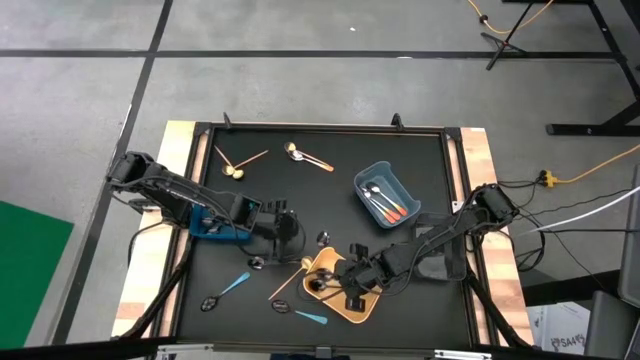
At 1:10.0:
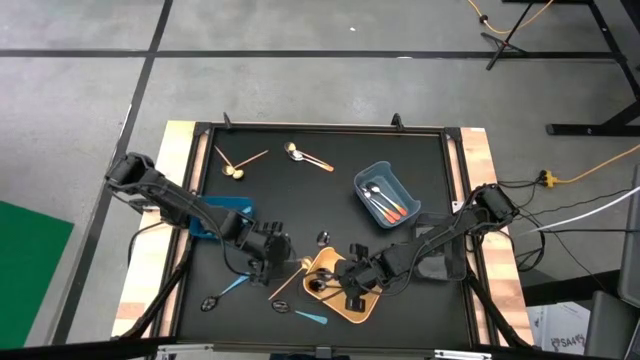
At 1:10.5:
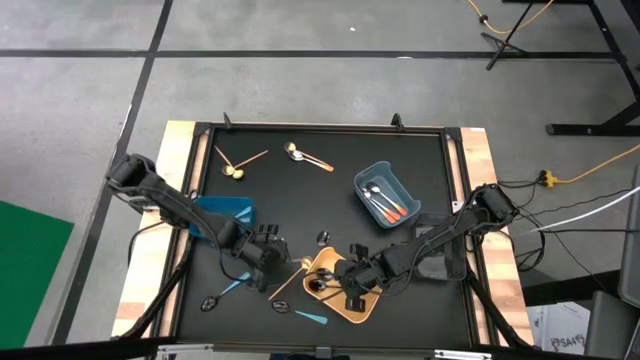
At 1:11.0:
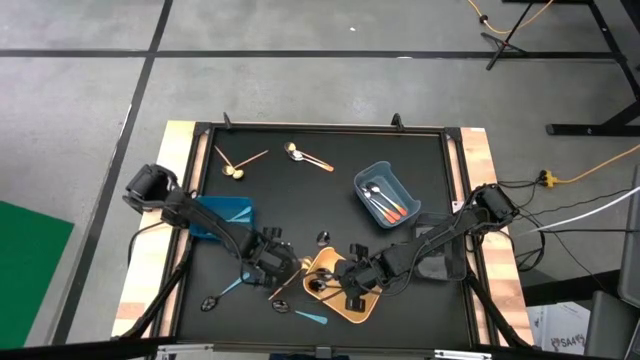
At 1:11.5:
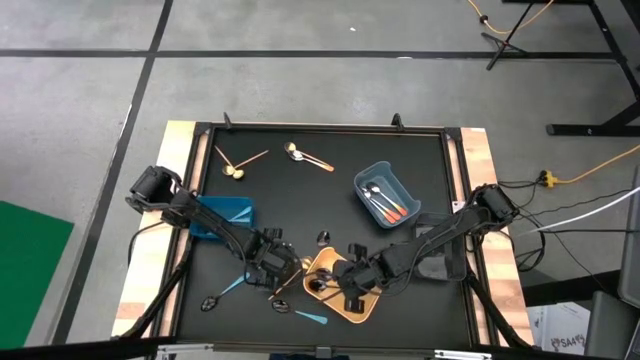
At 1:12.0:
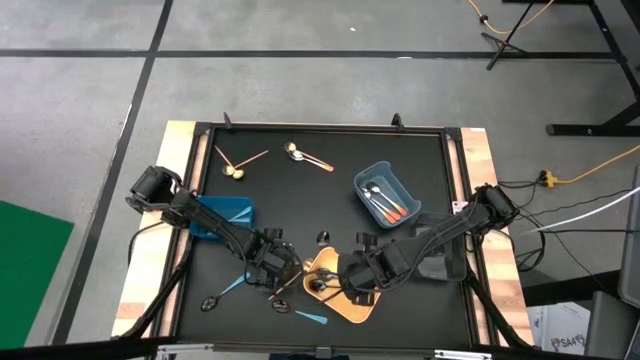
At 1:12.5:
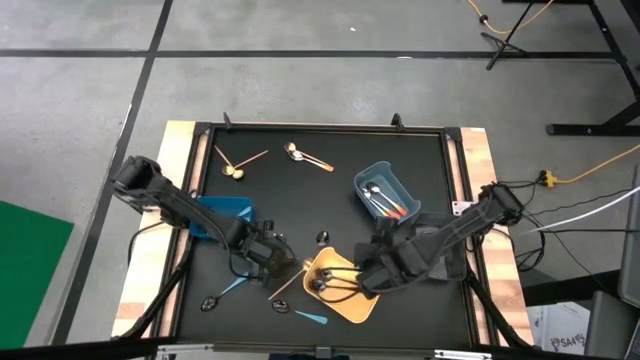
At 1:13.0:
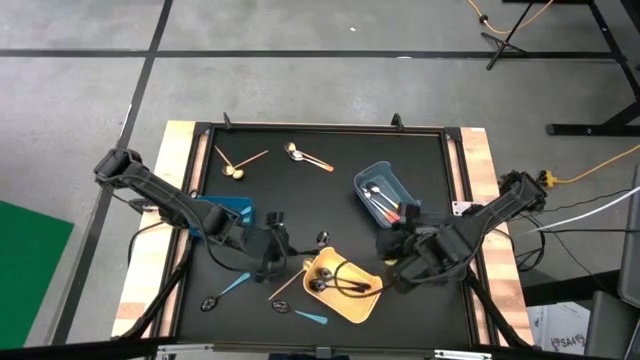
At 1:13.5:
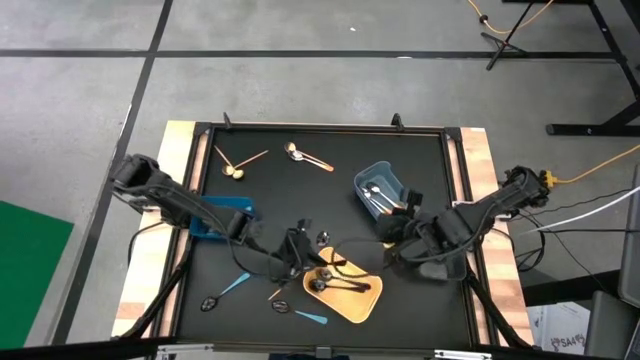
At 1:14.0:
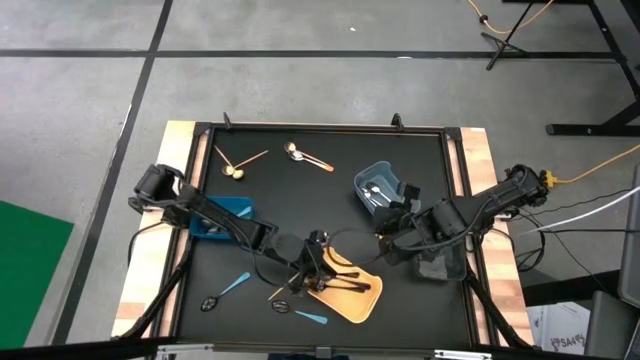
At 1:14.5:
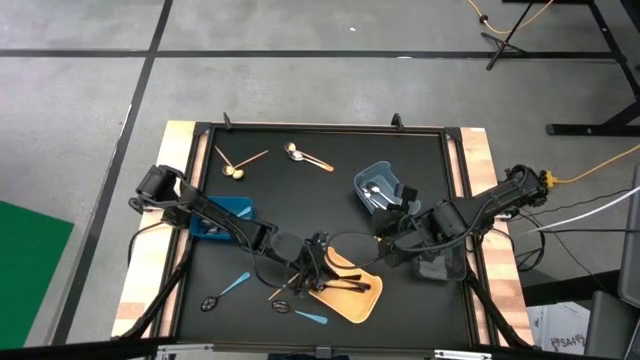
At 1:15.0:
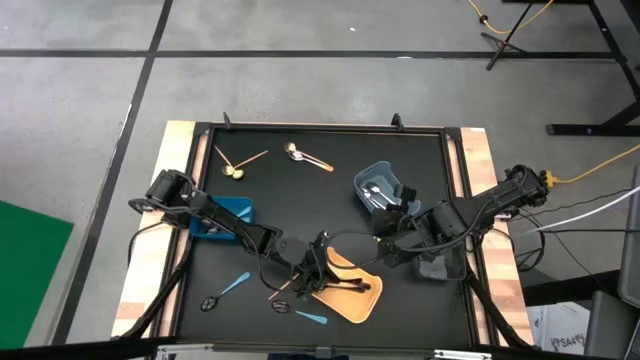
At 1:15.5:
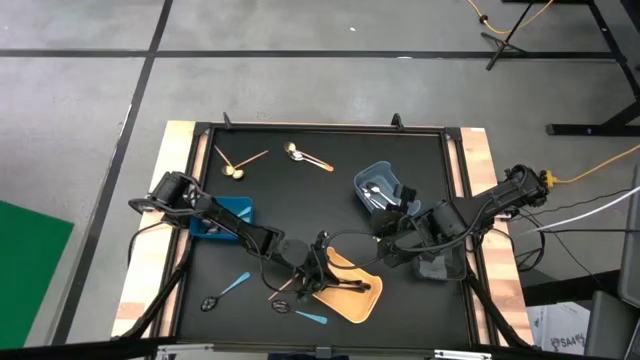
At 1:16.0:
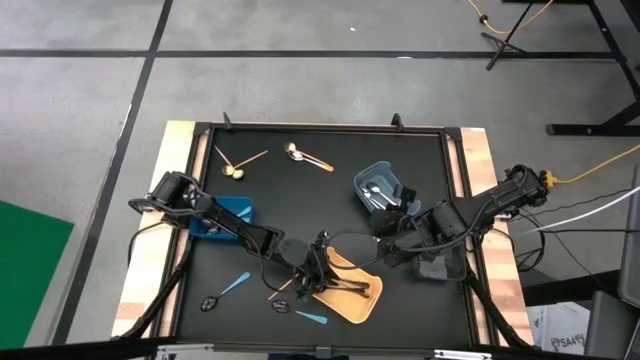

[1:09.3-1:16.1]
Task: Sort silverware by color (type)
Put the black spoon into the yellow bin

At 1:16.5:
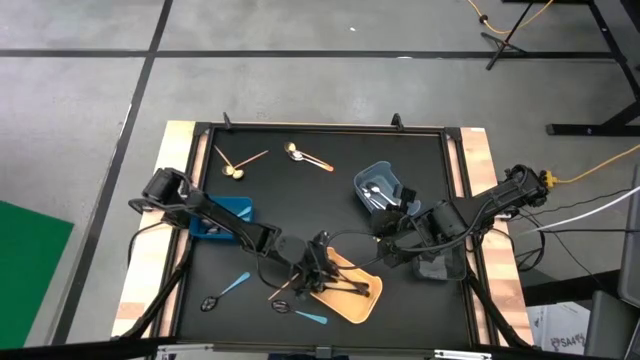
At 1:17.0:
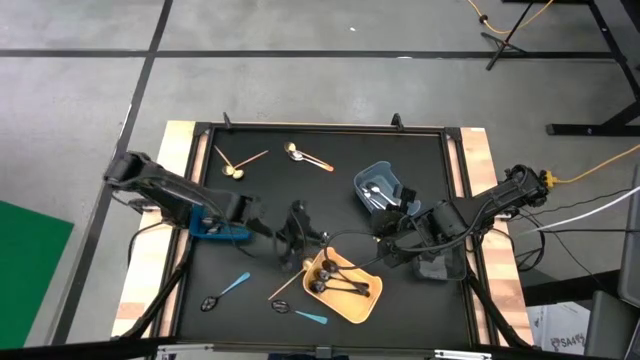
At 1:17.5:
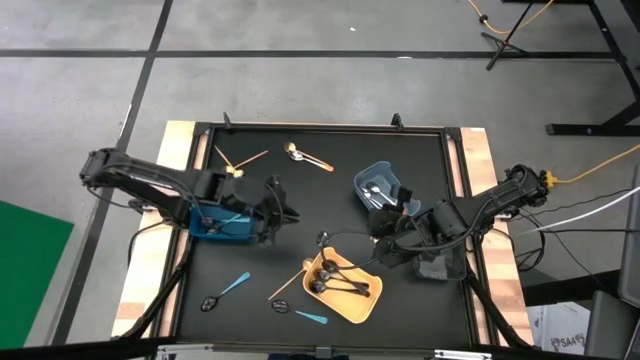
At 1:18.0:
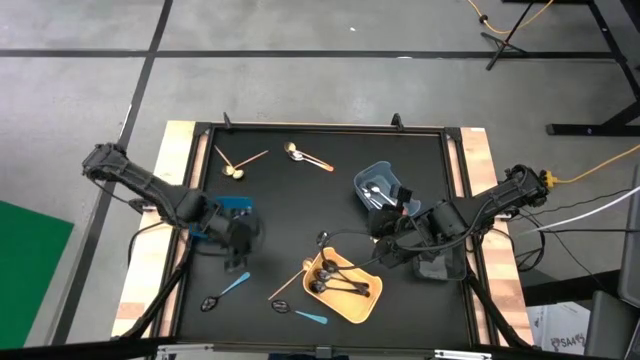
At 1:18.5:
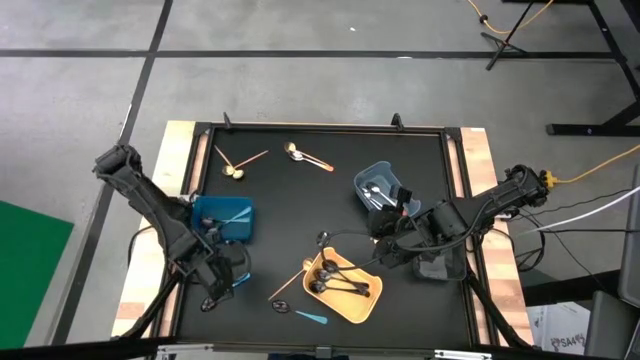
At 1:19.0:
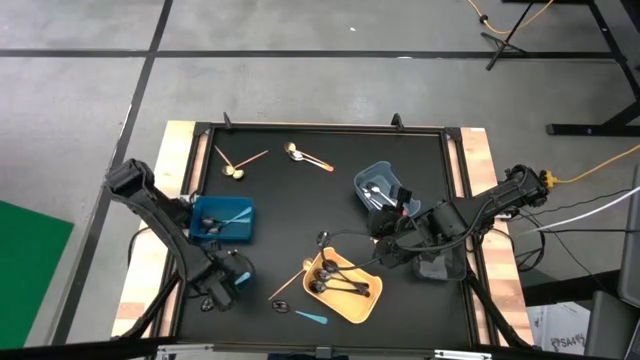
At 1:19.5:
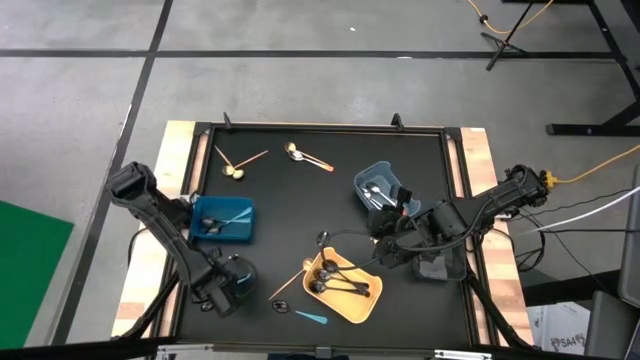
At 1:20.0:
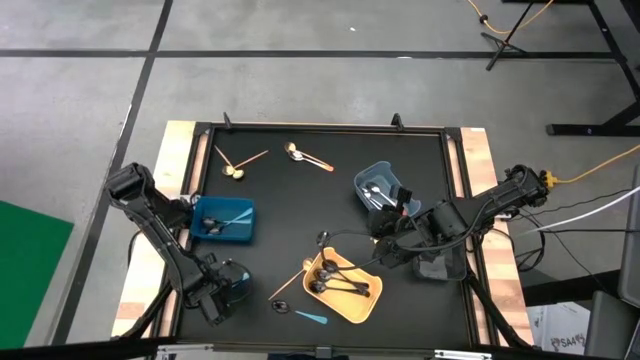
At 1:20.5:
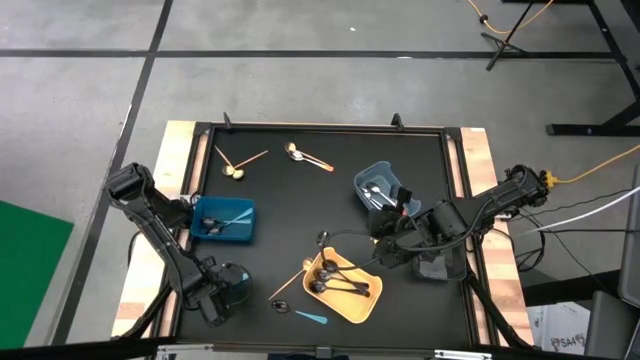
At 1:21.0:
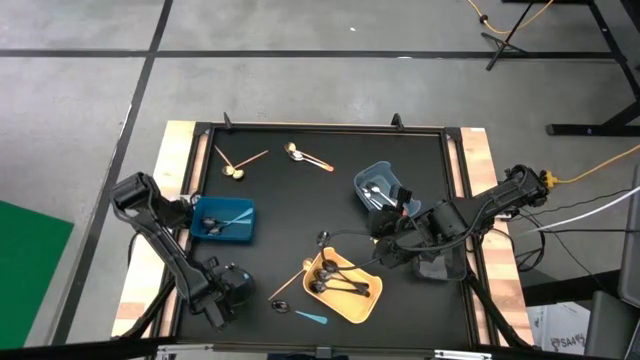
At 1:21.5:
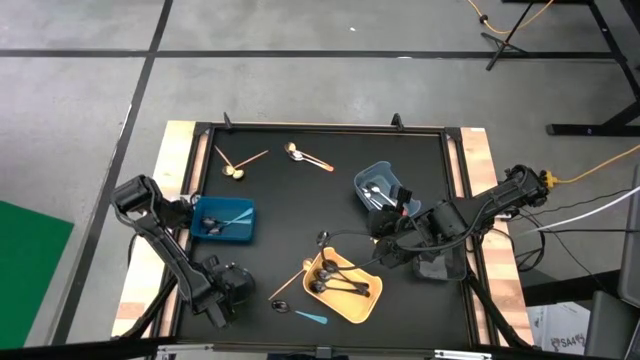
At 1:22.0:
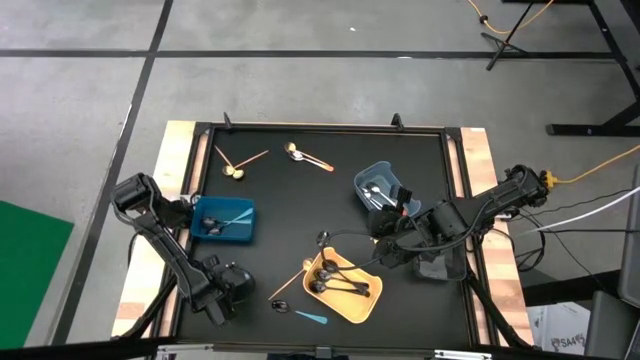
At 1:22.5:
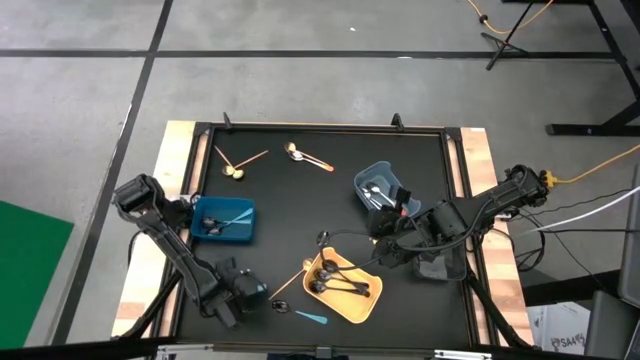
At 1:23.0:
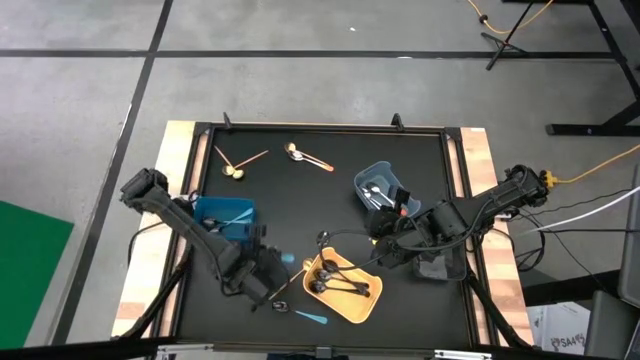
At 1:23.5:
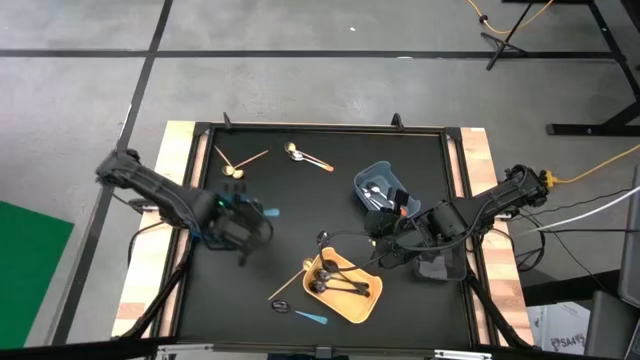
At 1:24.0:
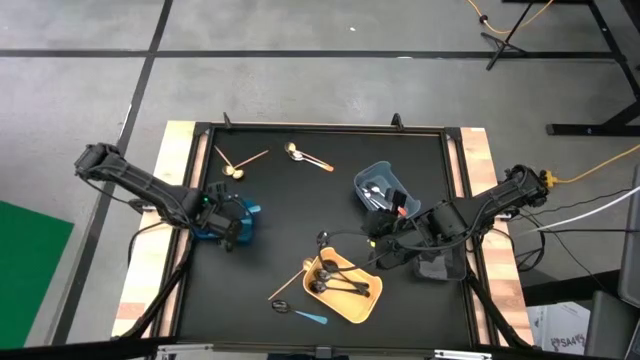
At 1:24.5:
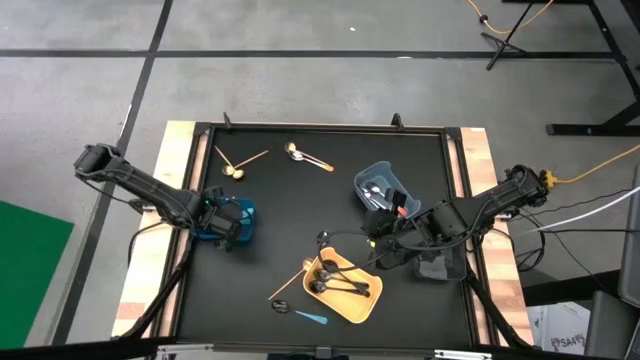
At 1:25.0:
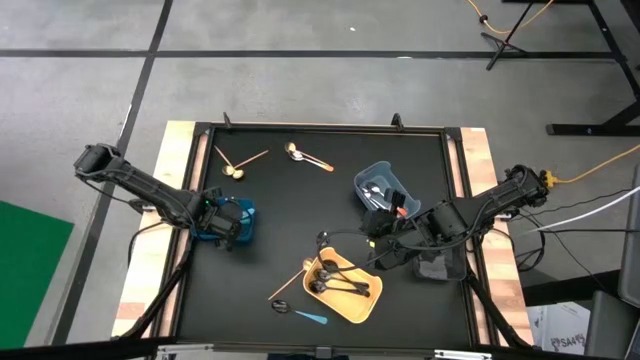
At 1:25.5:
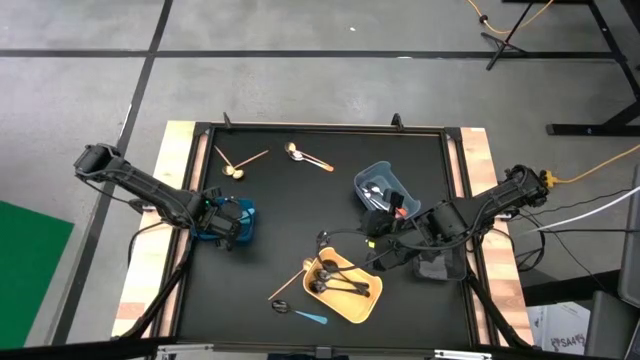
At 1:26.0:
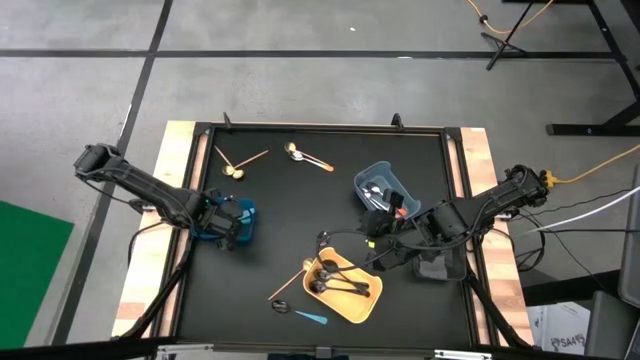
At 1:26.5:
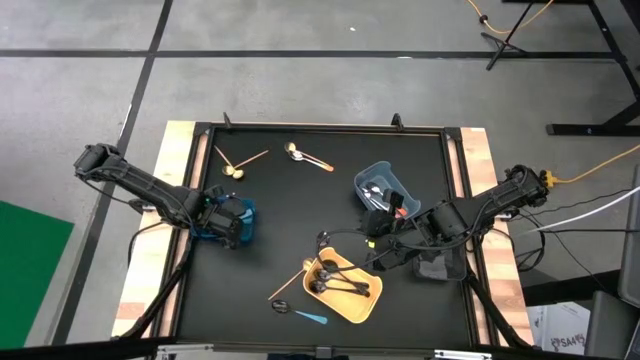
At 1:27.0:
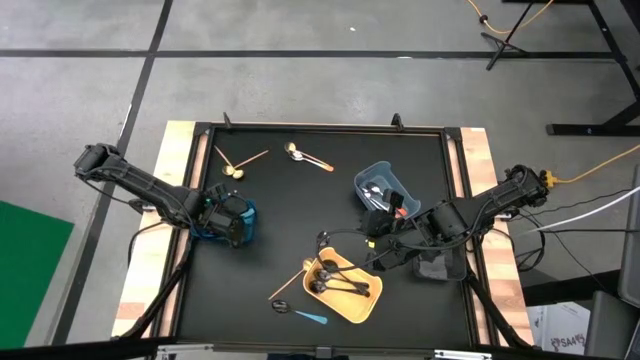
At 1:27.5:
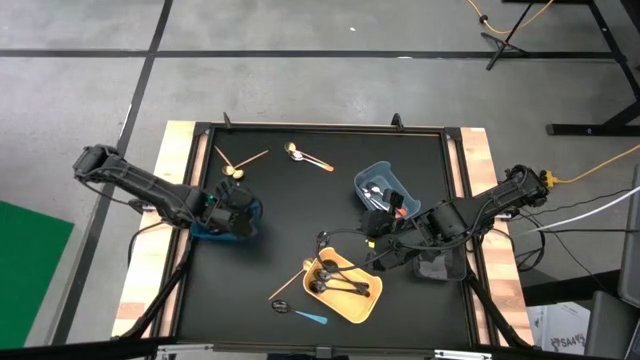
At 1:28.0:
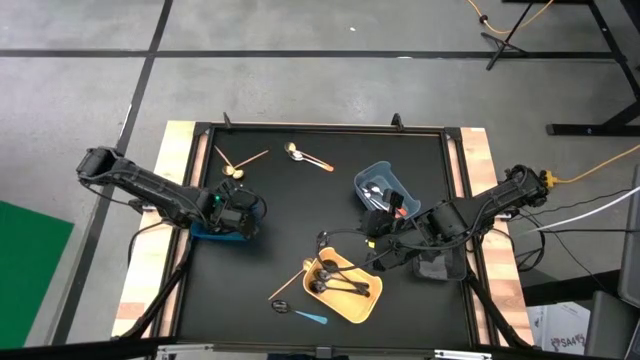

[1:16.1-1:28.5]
Put the blue spoon into the blue bin

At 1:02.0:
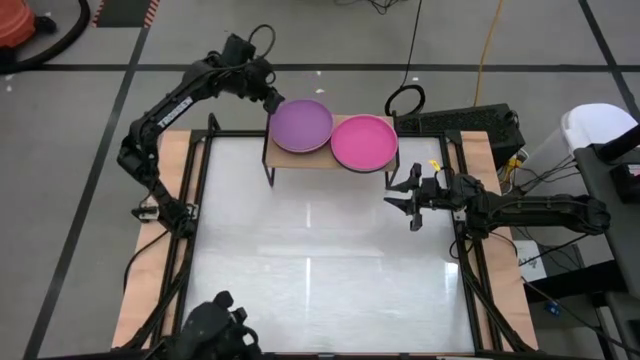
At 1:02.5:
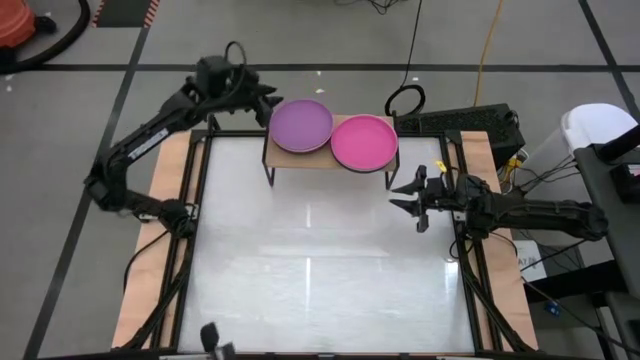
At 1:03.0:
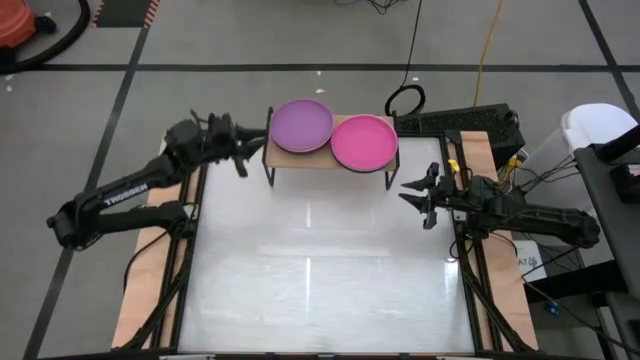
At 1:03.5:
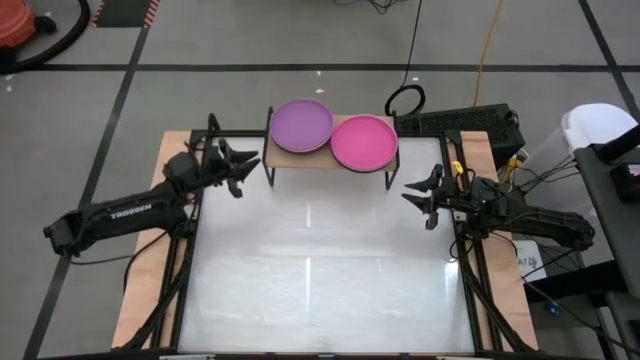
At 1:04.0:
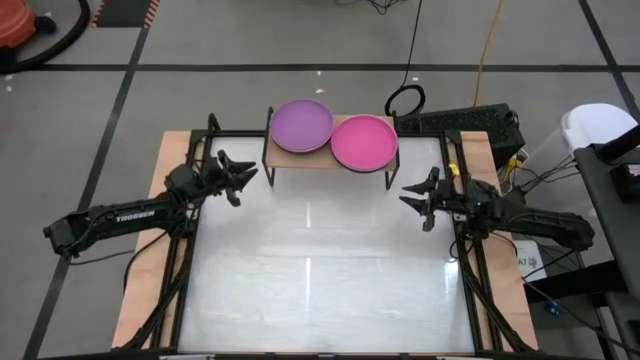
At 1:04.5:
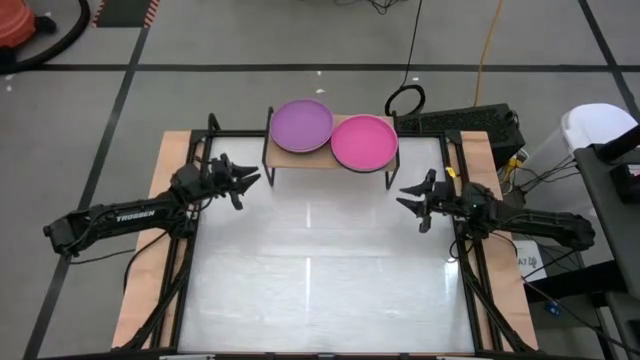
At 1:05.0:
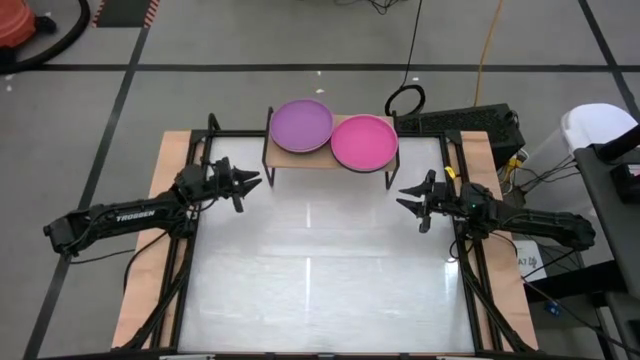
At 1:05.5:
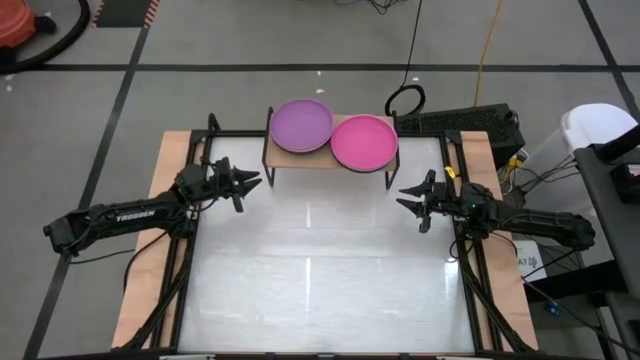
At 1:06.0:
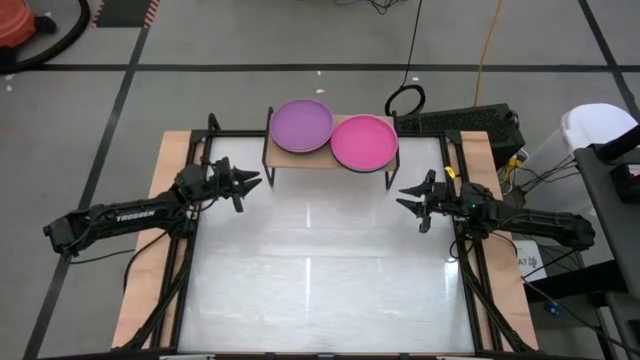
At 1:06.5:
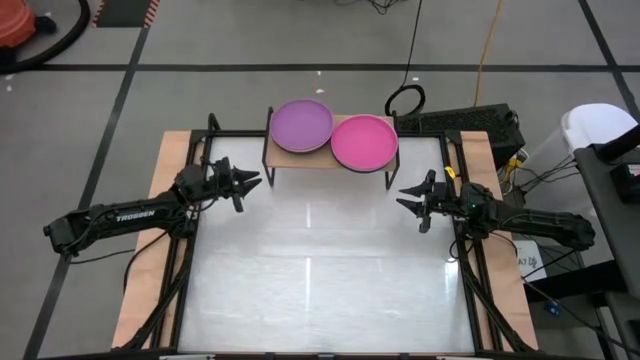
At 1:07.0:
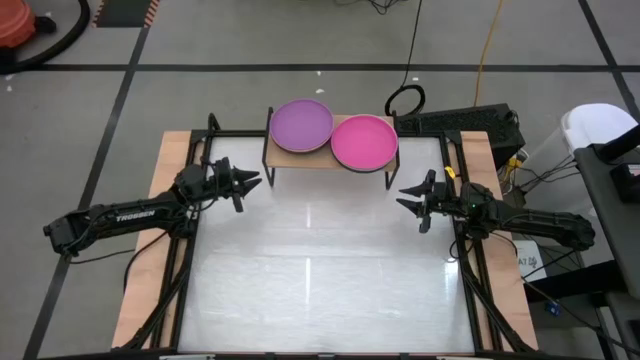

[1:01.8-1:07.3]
Task: Place and stack plates onto a shelf
Return to Home Position
